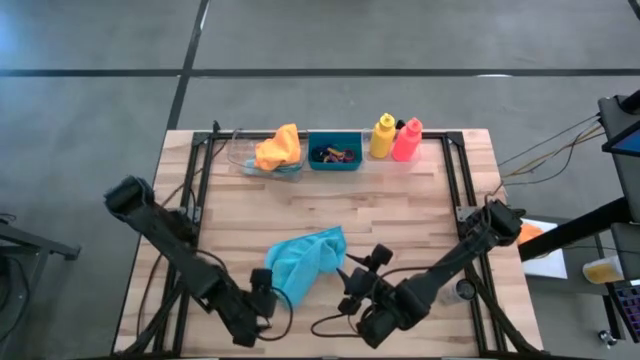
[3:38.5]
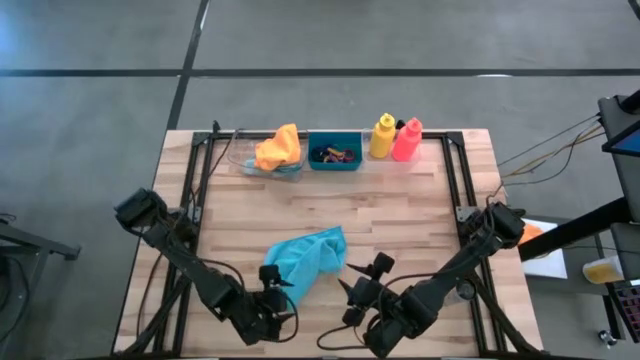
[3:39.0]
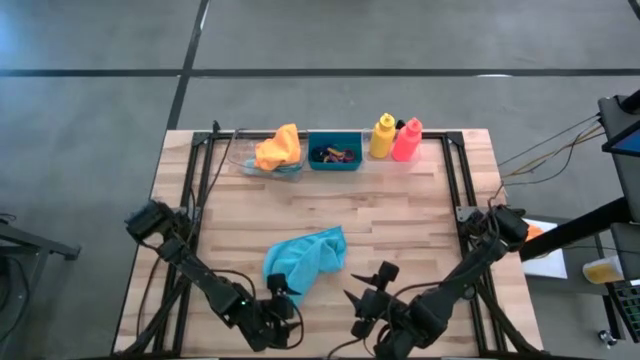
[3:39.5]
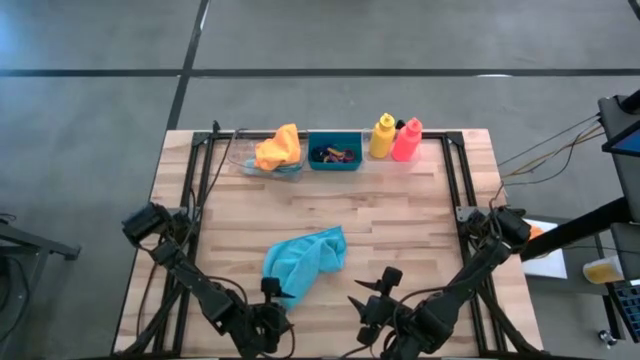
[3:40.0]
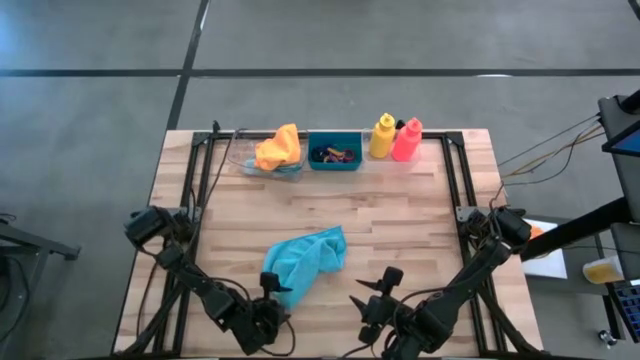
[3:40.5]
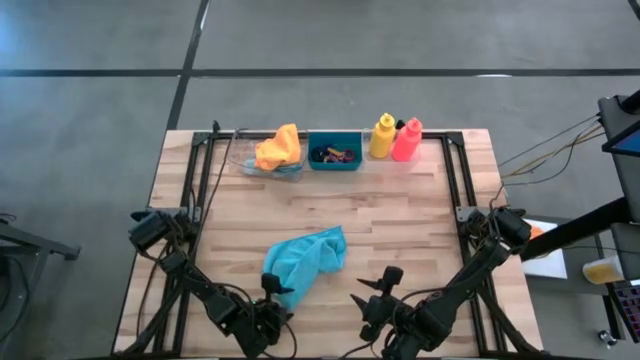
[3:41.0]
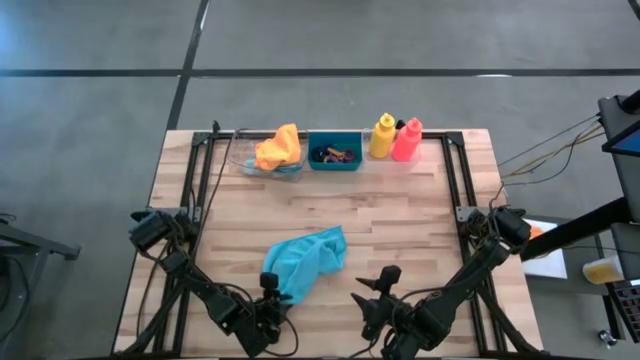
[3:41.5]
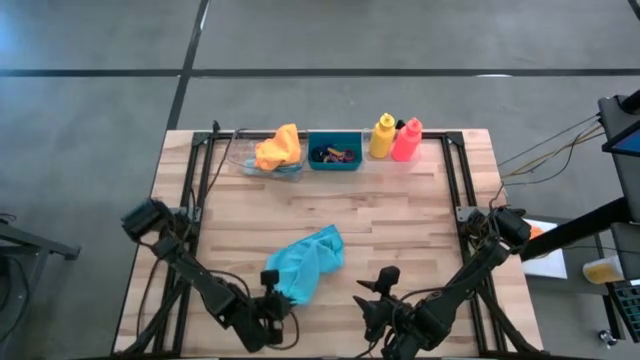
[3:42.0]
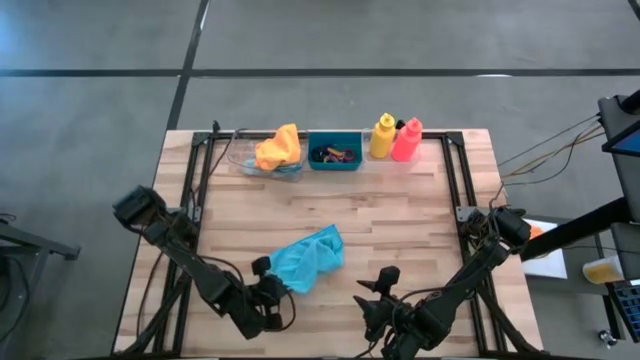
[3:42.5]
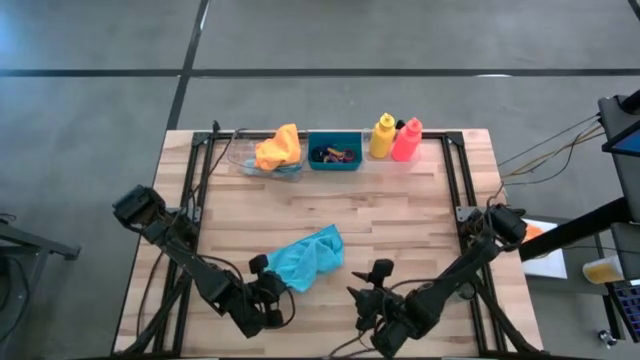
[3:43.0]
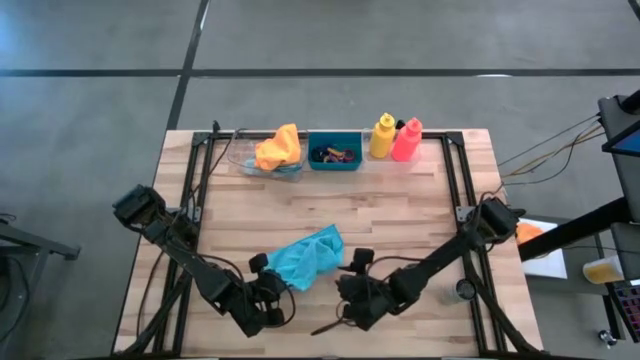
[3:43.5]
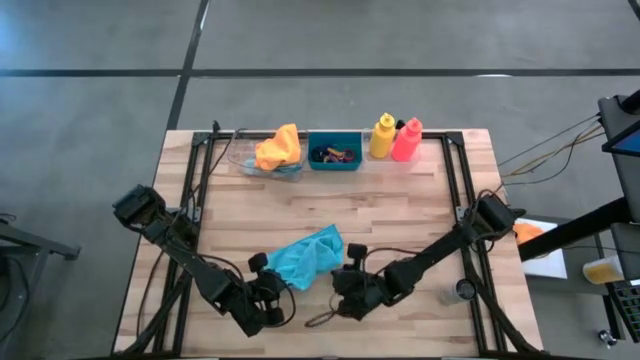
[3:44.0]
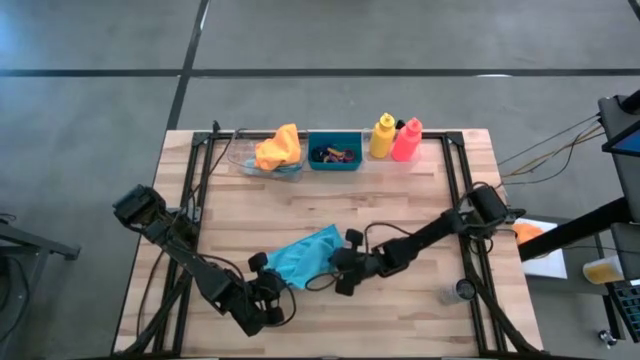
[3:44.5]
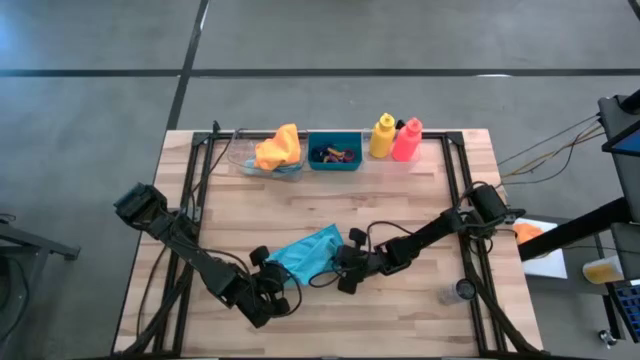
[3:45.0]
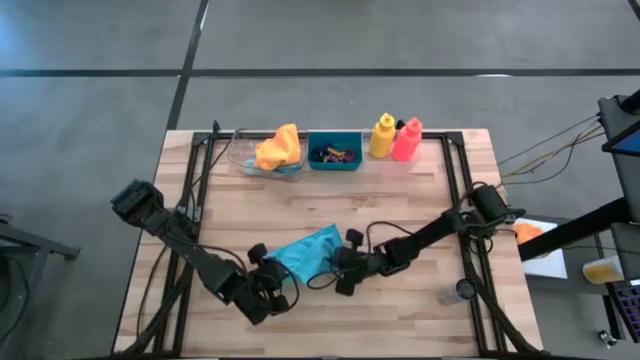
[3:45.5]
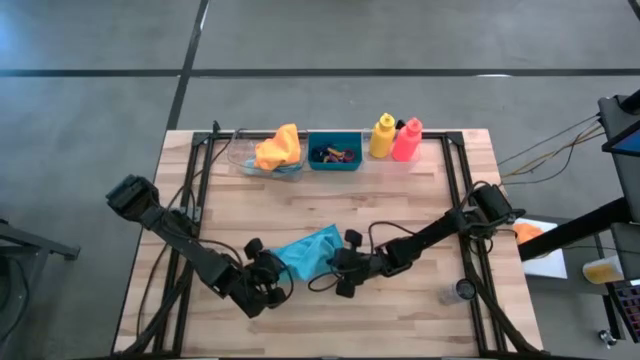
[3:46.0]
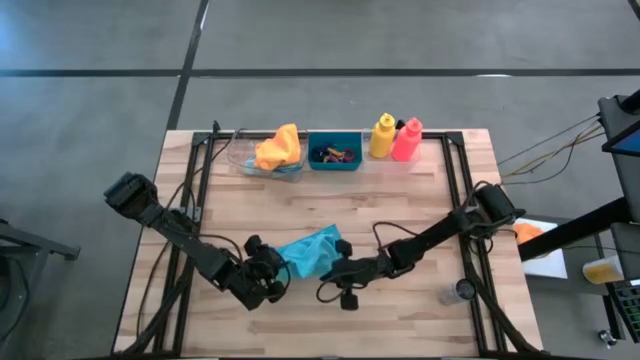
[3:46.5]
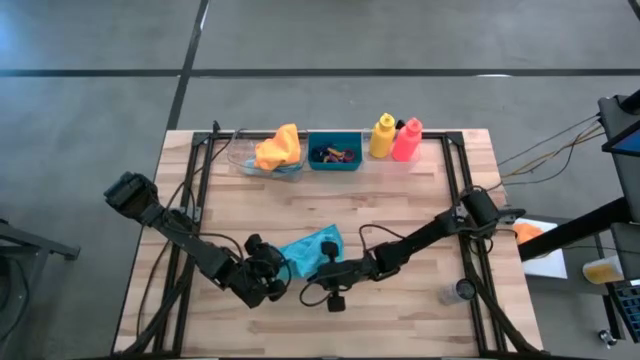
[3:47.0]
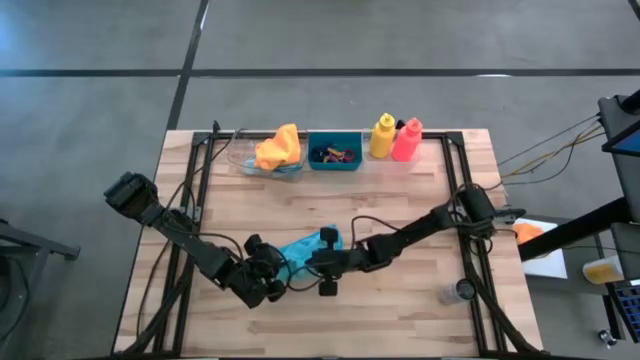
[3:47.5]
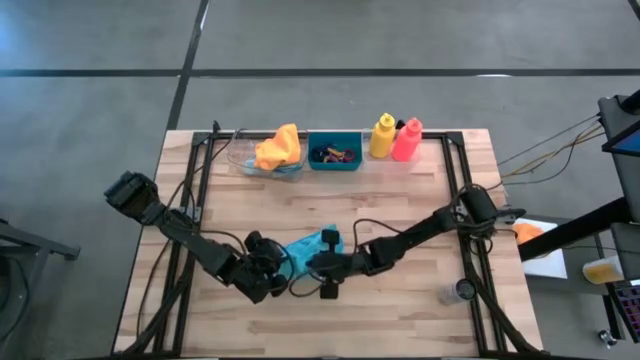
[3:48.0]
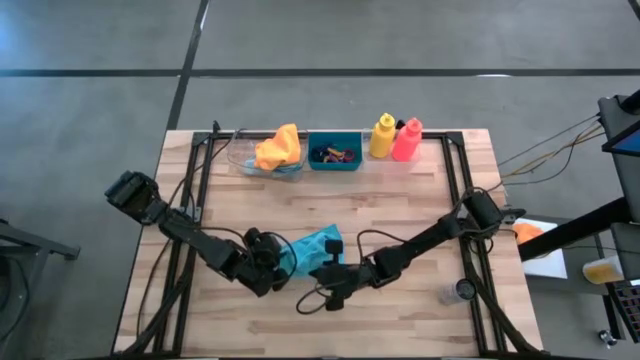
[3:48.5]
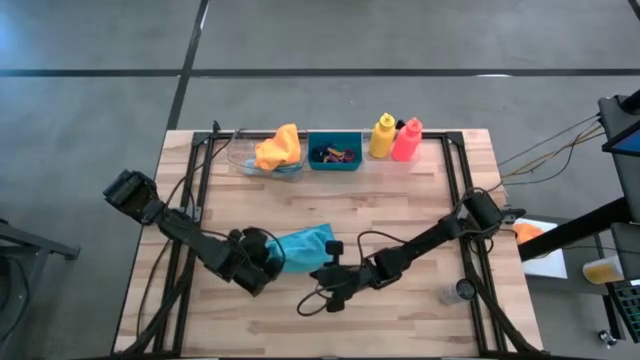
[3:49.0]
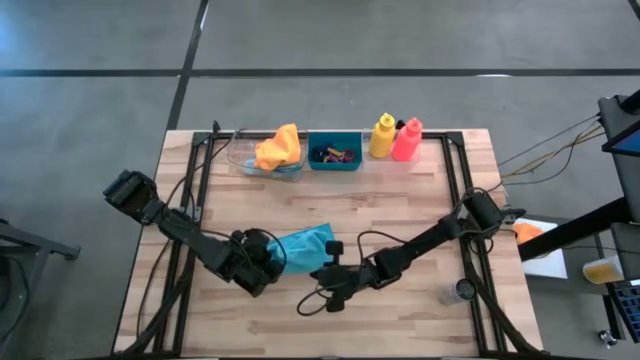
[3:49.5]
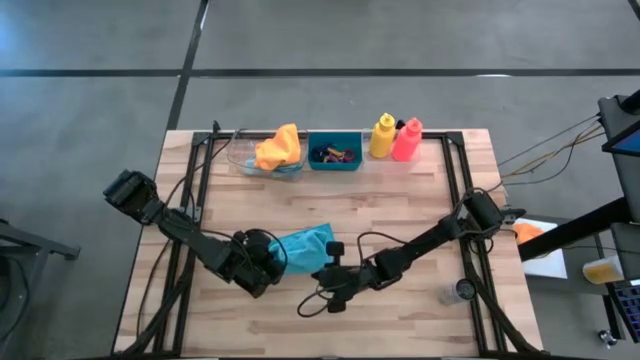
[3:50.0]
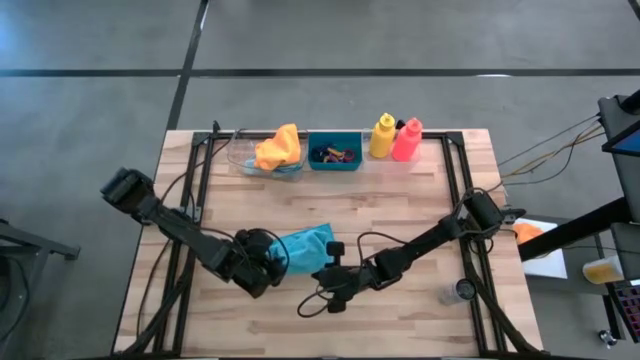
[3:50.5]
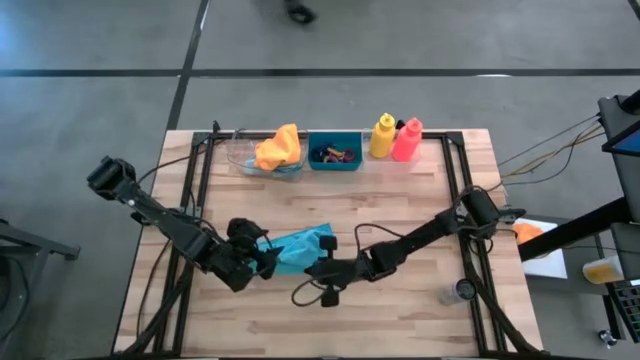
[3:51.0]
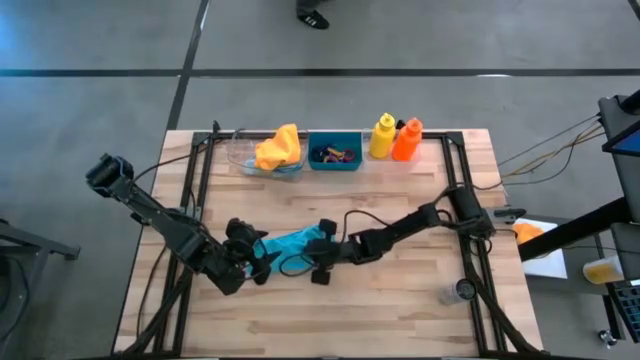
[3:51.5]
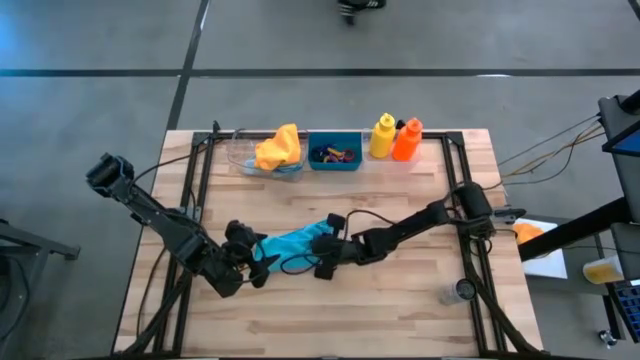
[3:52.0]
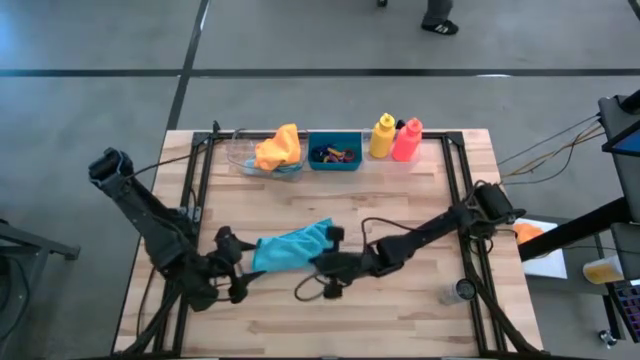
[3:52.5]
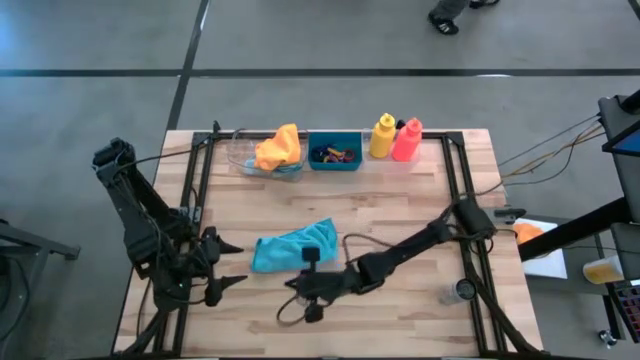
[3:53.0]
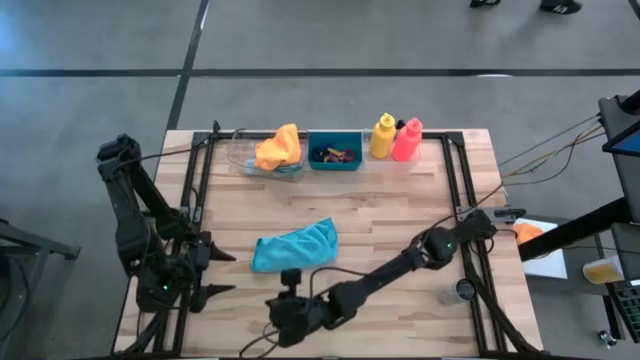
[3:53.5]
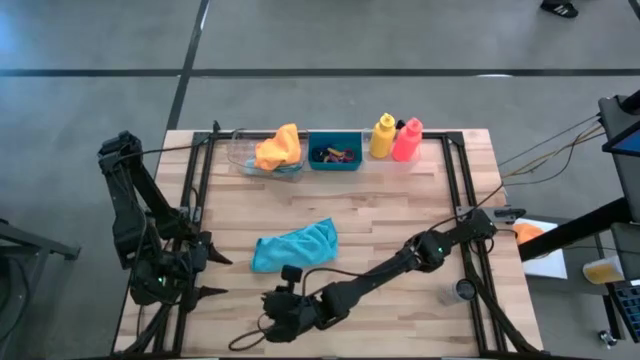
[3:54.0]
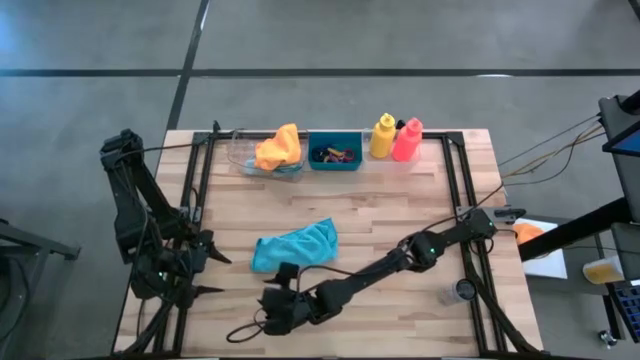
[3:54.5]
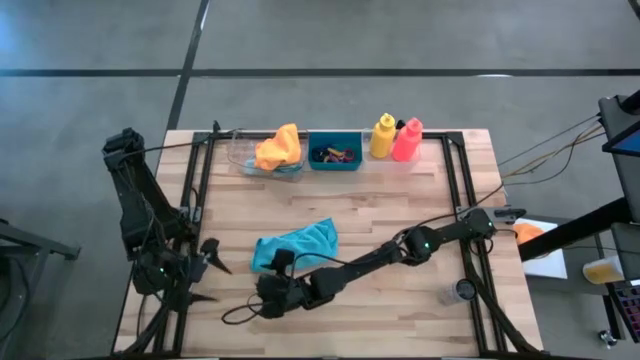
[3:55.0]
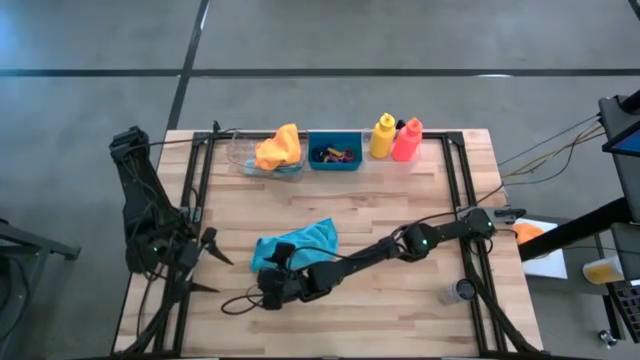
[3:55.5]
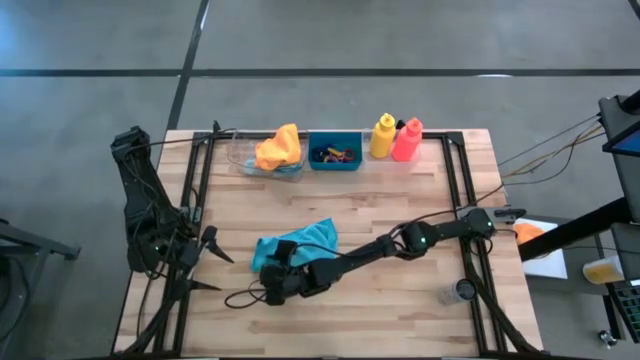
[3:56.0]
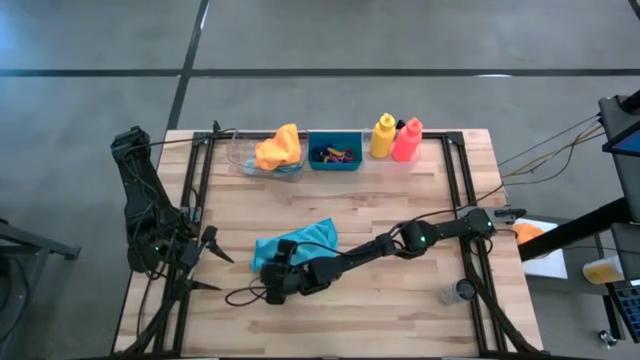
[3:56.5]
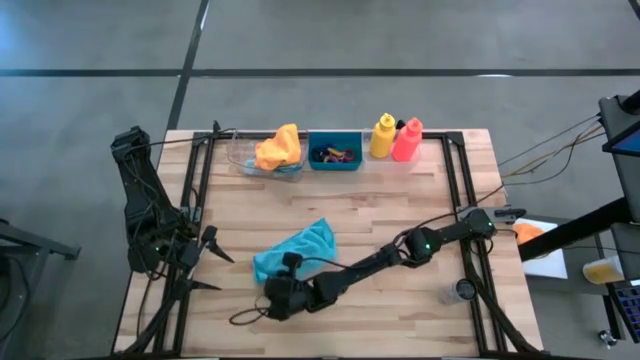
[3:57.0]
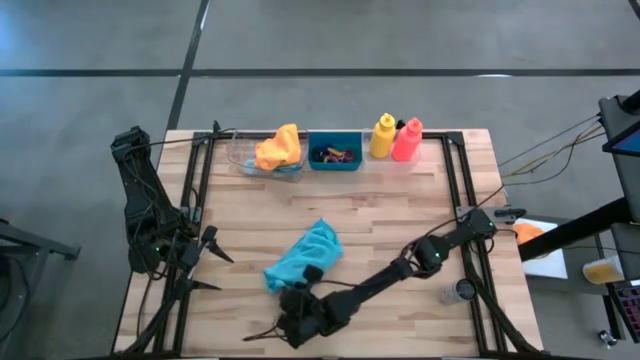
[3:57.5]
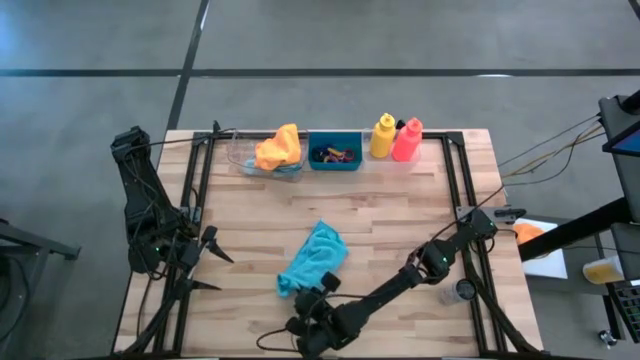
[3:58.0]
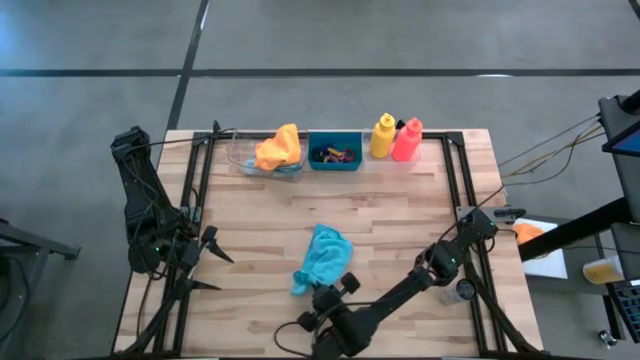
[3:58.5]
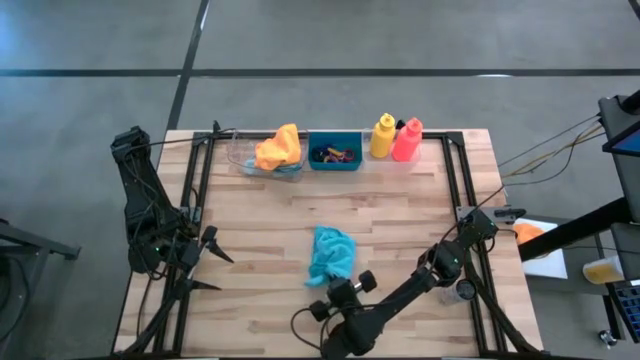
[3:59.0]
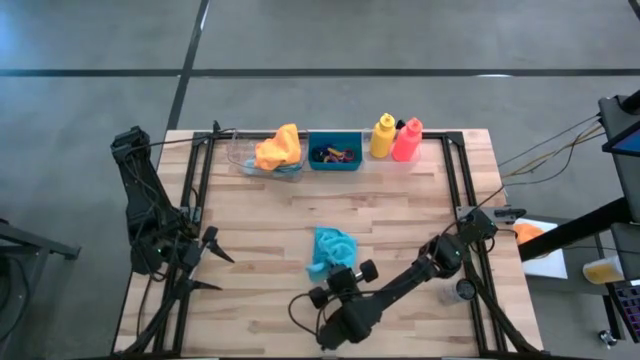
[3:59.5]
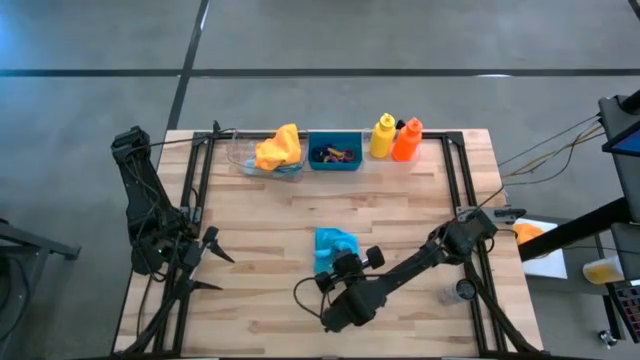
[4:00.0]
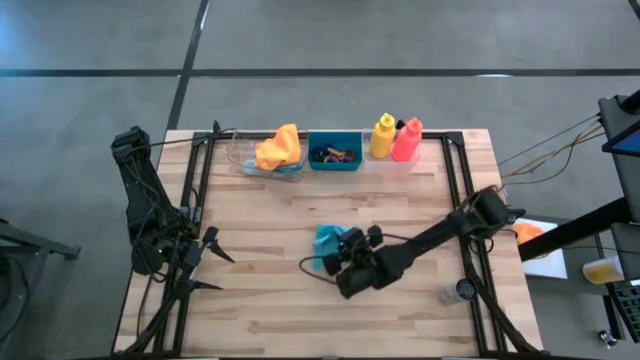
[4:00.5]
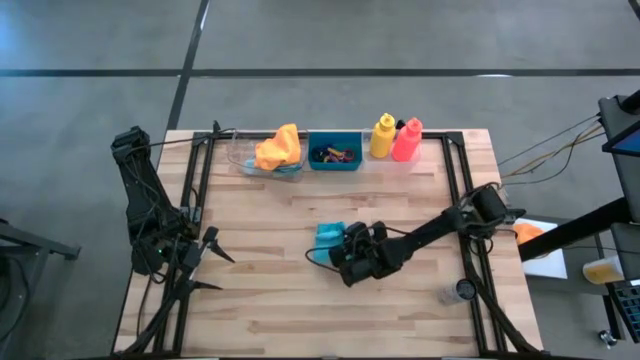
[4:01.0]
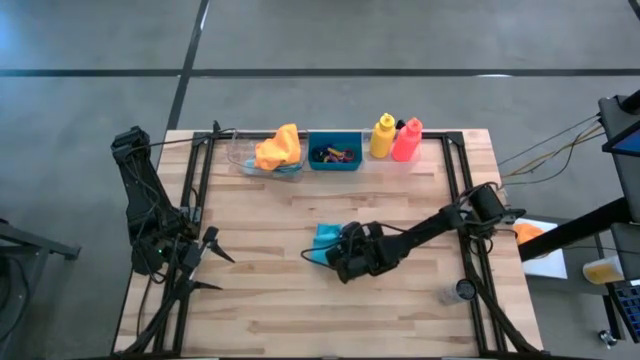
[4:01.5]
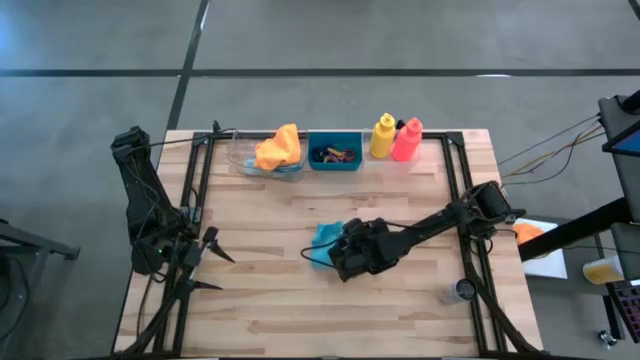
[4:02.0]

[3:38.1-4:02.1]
Task: Pick & Place Sports Items
Fold the blue towel
